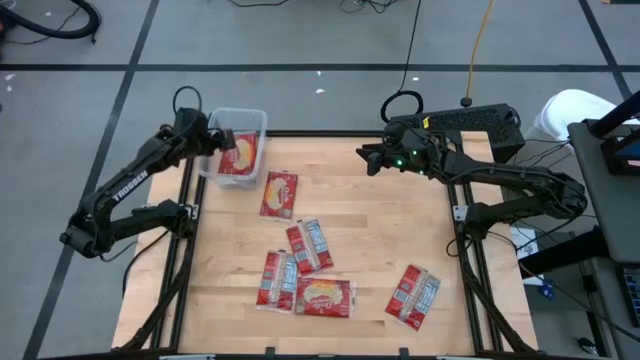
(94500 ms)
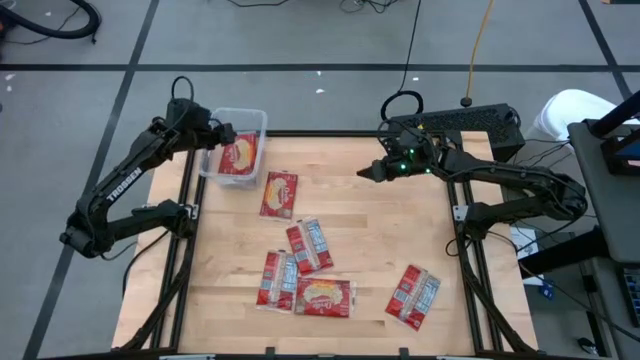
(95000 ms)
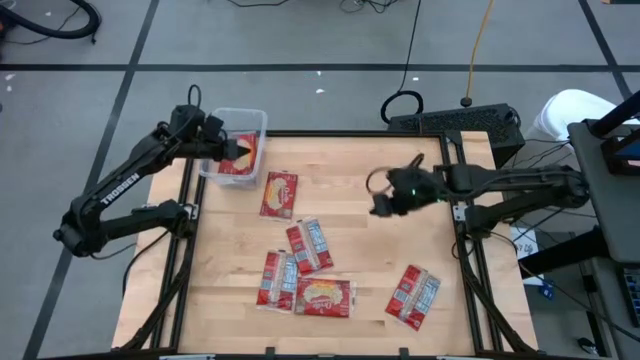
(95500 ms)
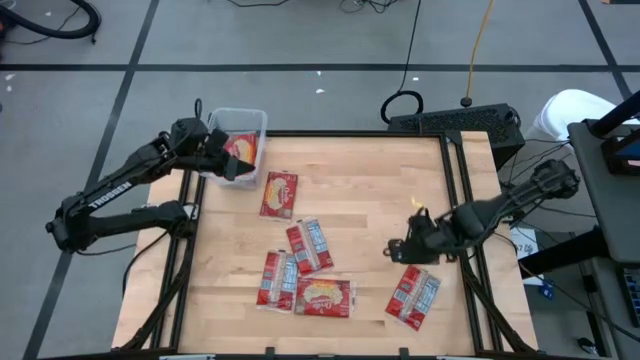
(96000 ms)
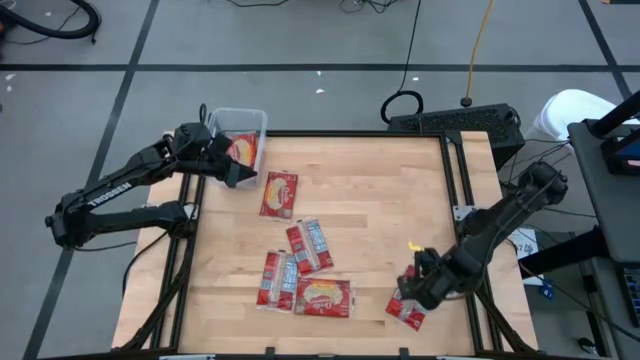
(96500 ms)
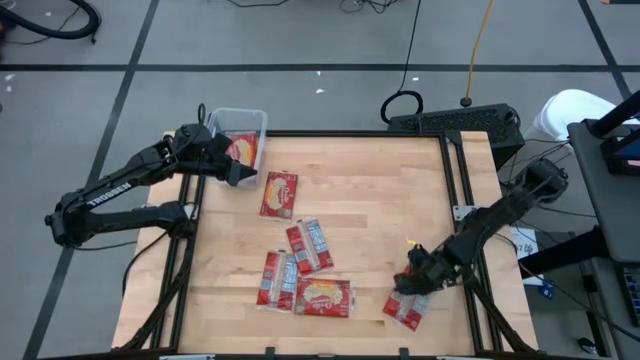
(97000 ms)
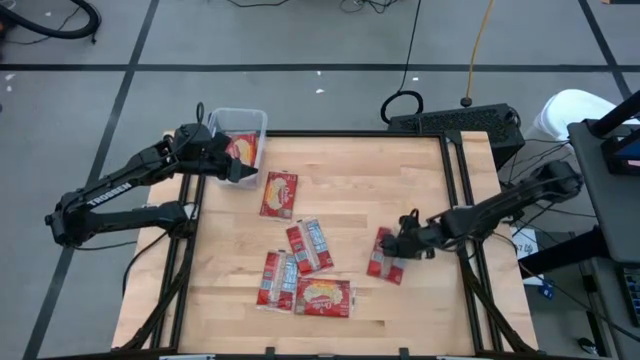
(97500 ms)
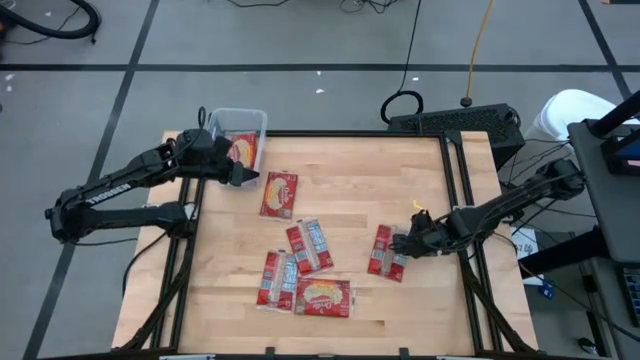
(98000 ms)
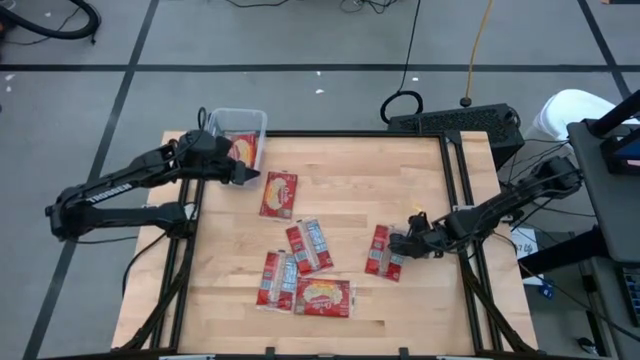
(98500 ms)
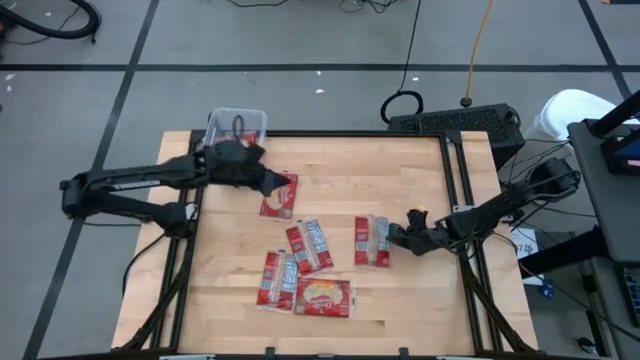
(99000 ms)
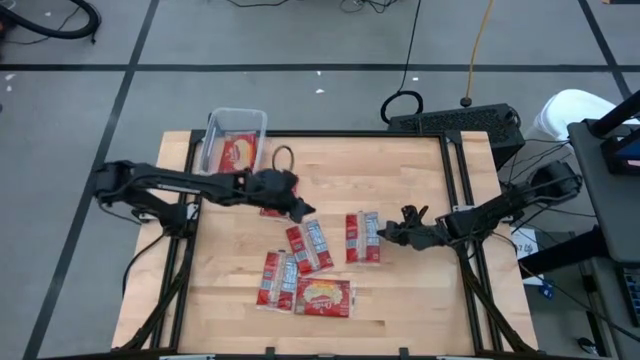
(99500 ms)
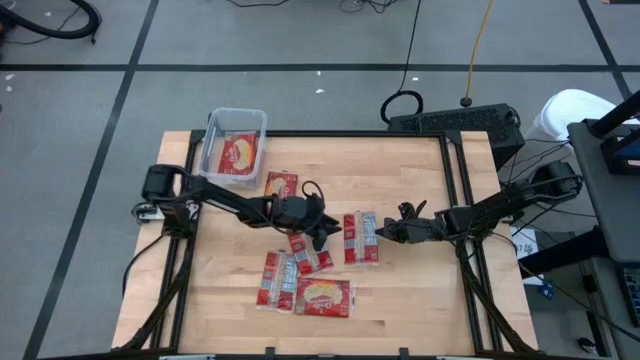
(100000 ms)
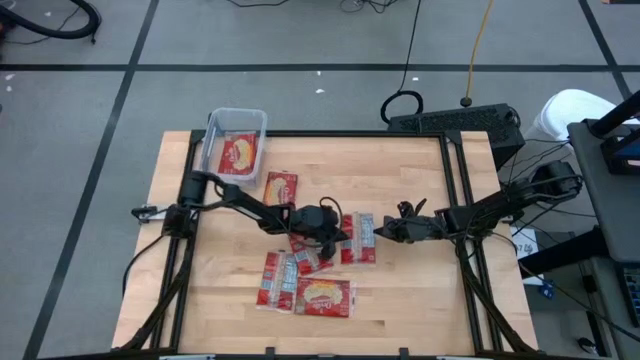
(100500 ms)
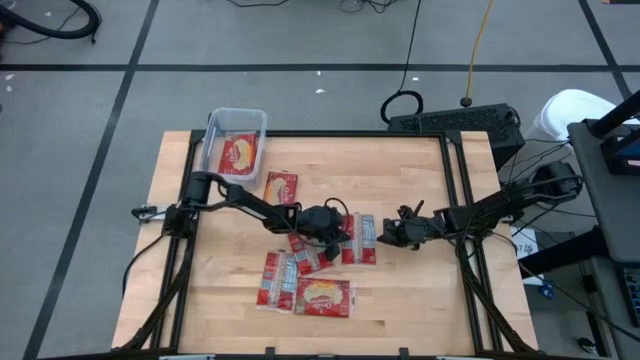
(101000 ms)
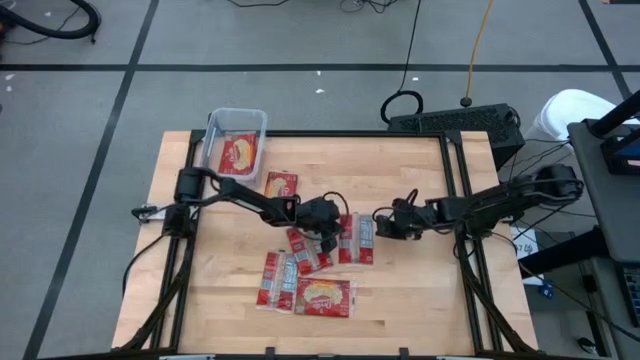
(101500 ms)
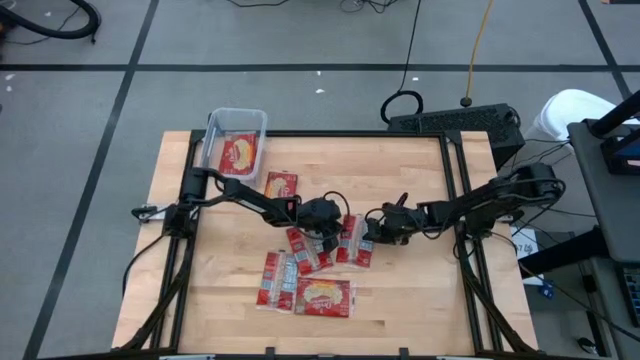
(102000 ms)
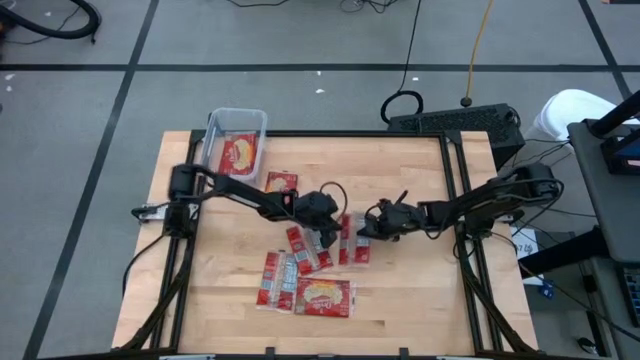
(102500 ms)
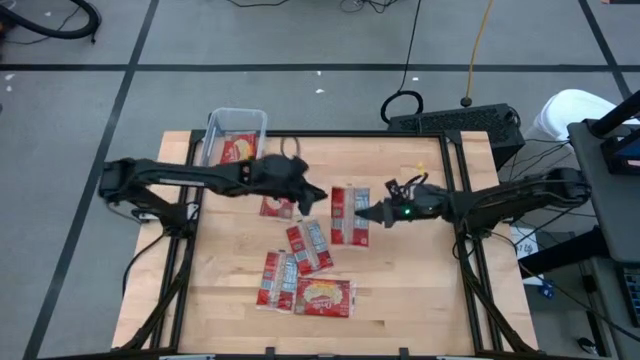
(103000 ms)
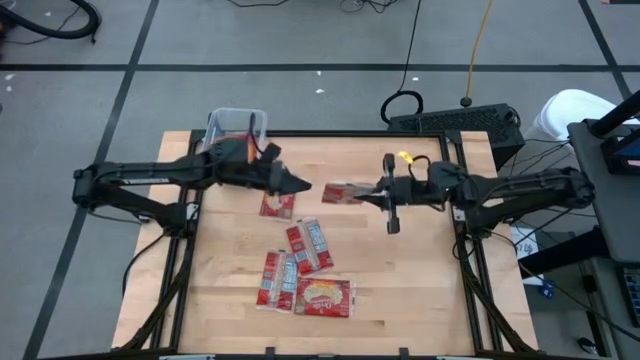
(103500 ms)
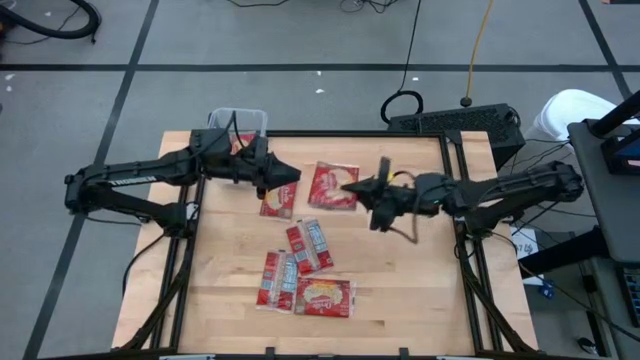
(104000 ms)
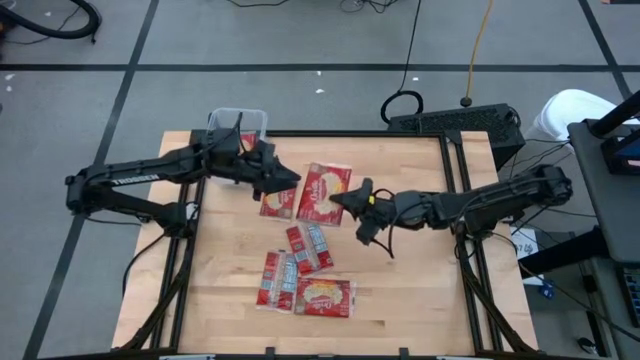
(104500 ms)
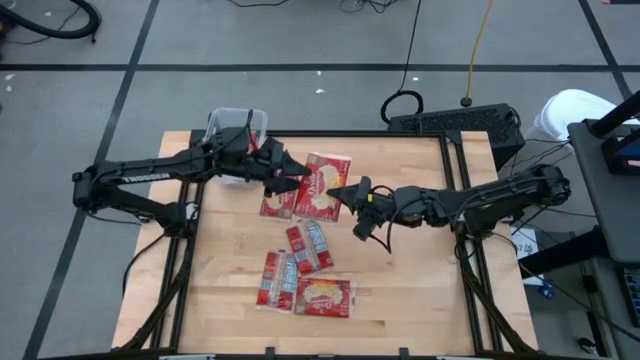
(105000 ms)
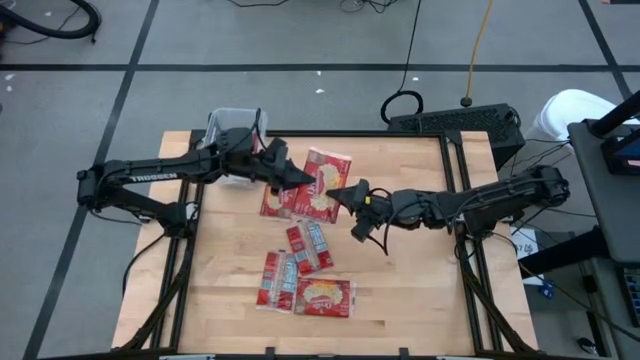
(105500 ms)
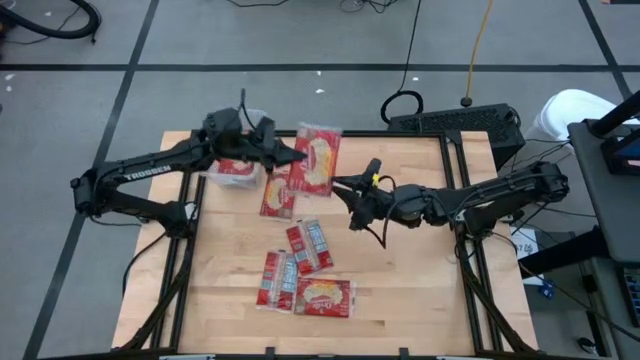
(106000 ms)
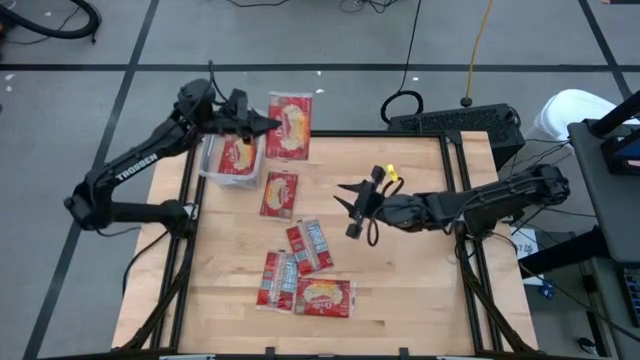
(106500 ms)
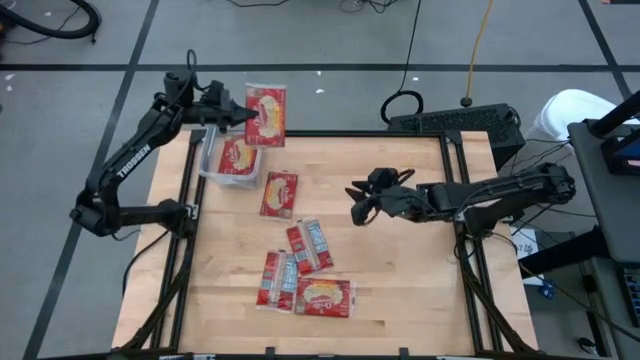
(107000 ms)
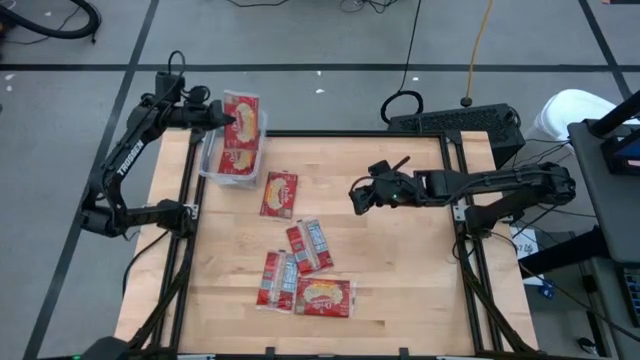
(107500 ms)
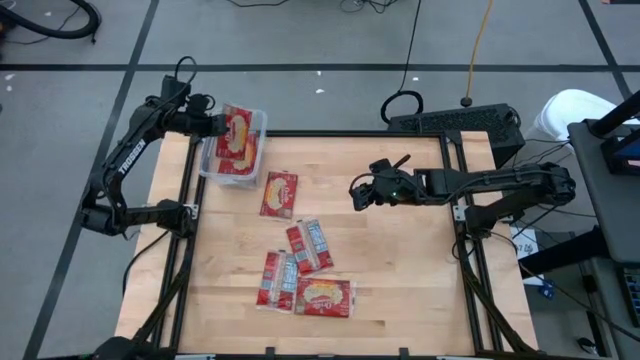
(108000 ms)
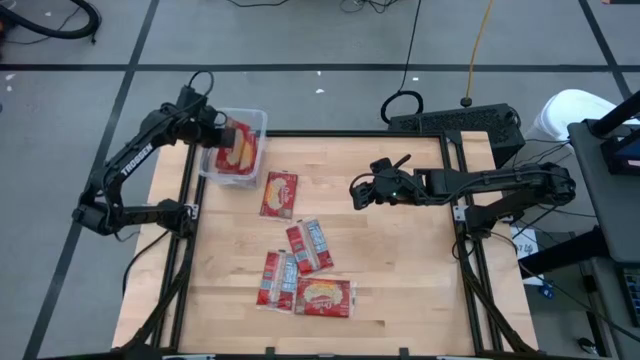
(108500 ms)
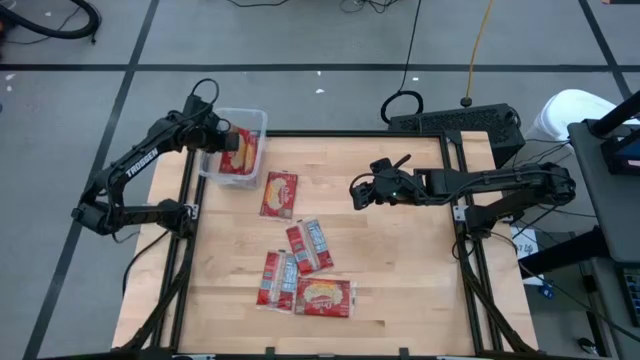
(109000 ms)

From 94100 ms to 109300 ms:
Task: Sort popcorn bags into baskets
Put the red popcorn bag into the transparent container

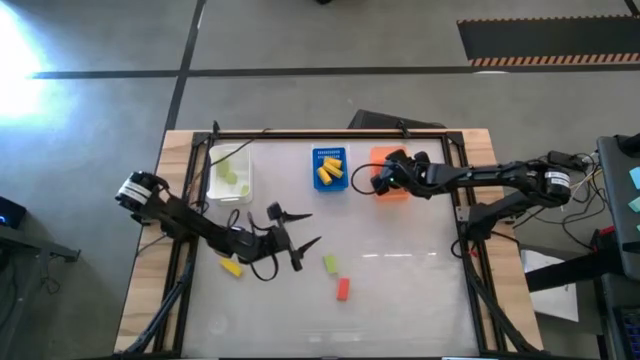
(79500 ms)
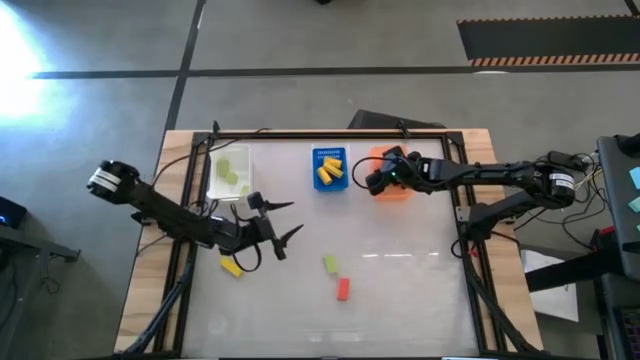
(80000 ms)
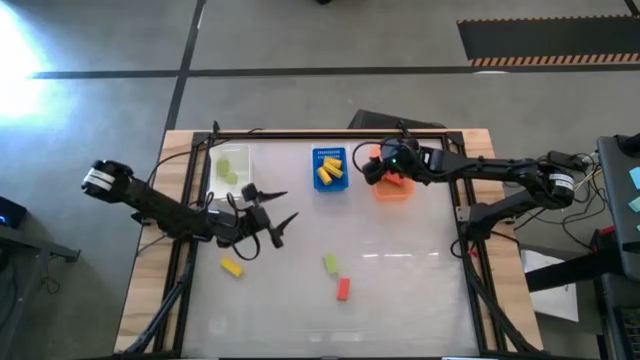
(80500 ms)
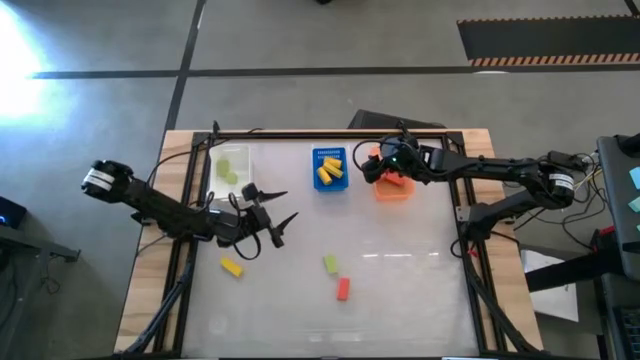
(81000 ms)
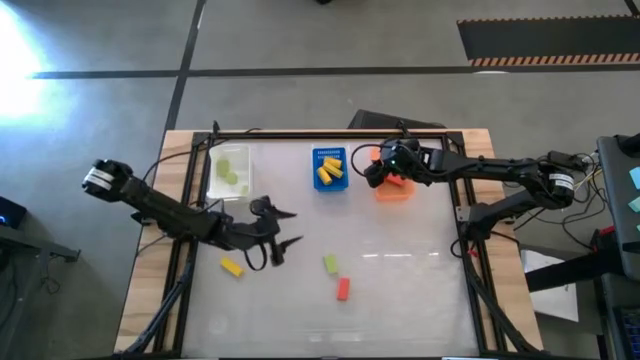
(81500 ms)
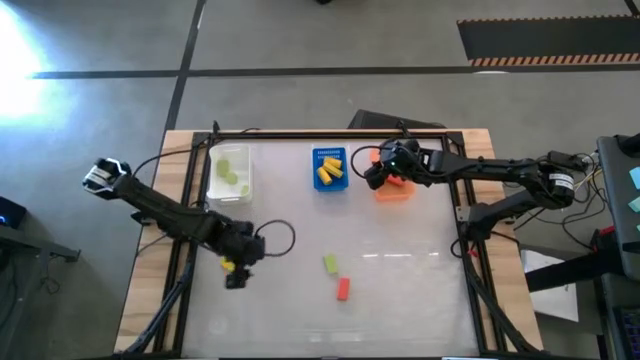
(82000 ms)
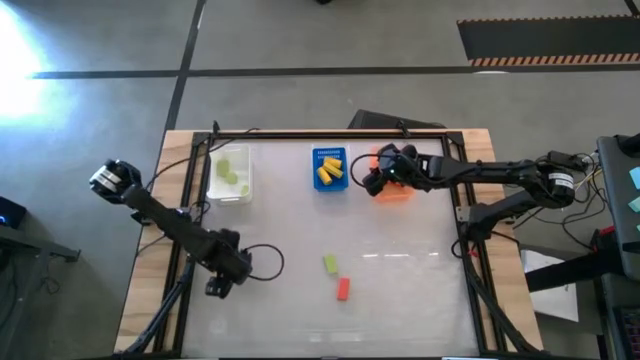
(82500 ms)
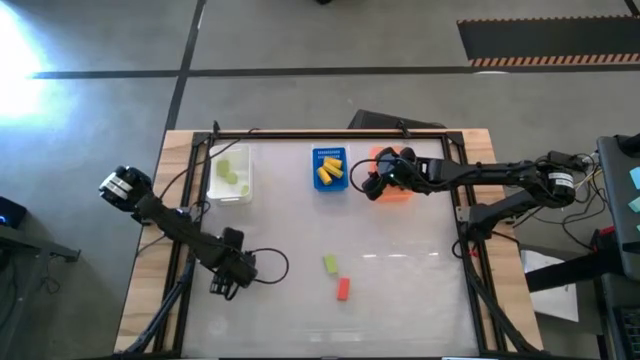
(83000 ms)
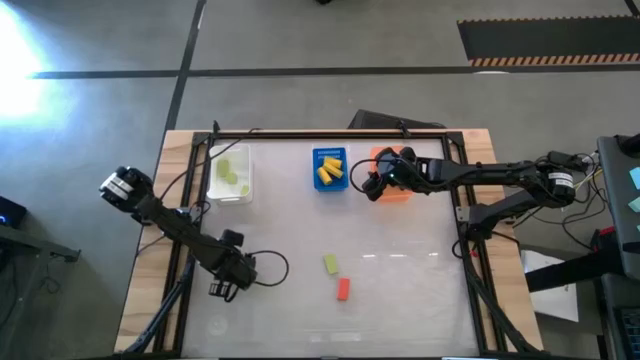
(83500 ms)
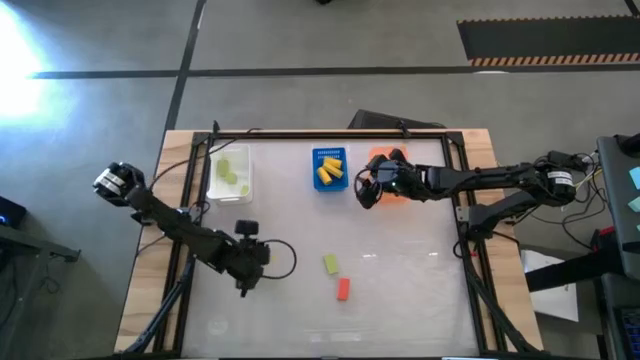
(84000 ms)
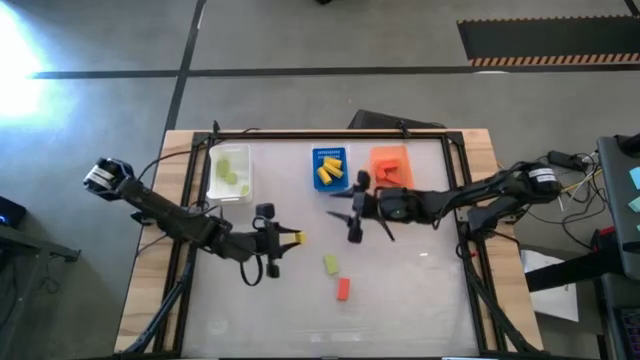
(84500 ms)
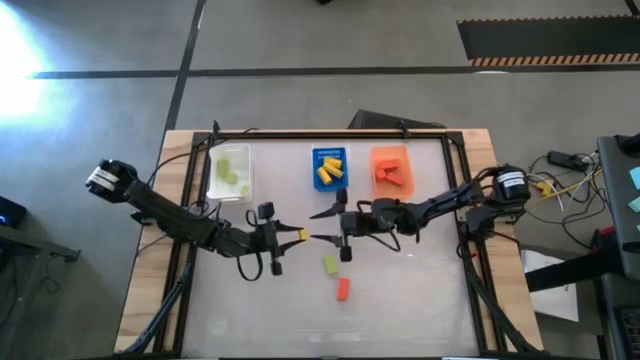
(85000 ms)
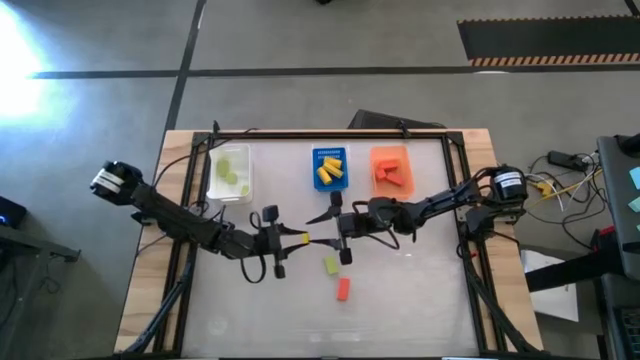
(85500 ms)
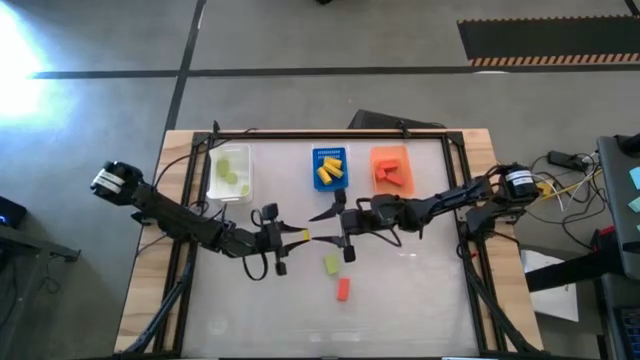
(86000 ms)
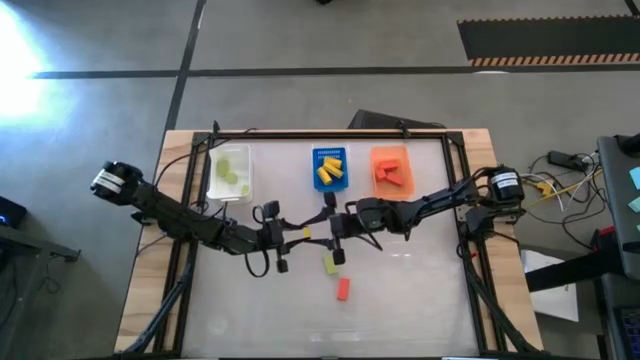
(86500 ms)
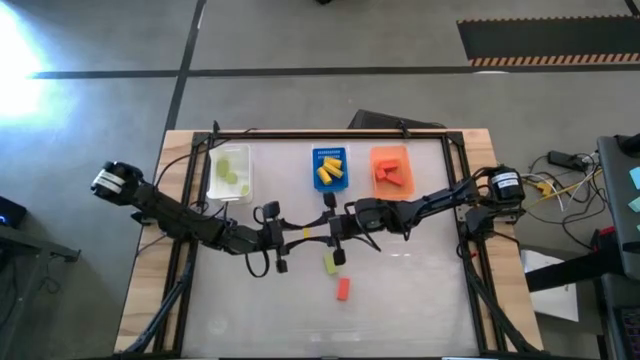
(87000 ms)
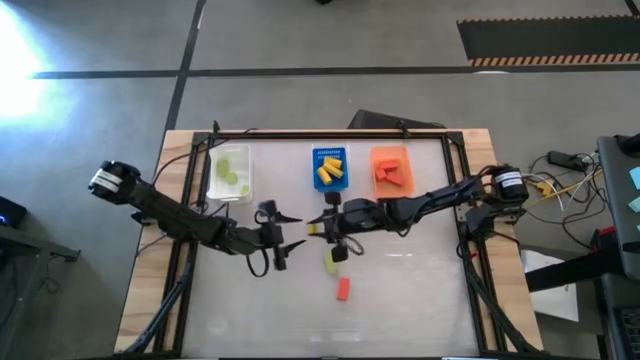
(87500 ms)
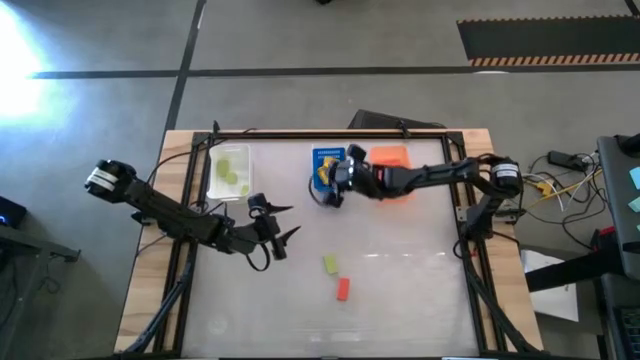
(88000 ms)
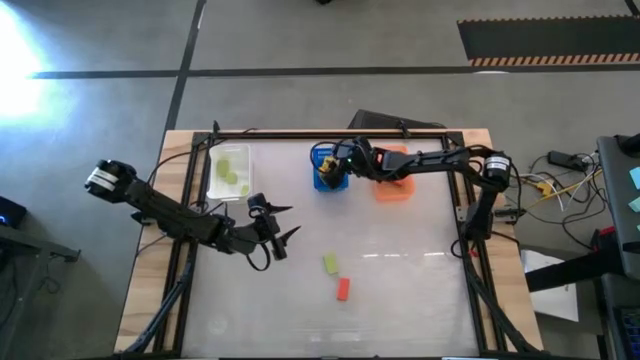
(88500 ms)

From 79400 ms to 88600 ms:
Task: Sort & place blocks by color
Put the yellow block into the blue bin
